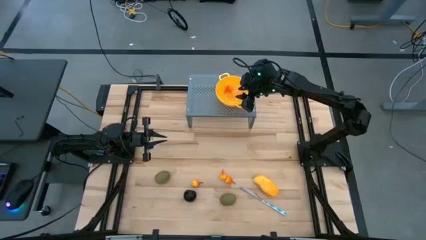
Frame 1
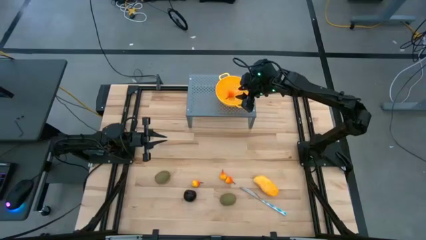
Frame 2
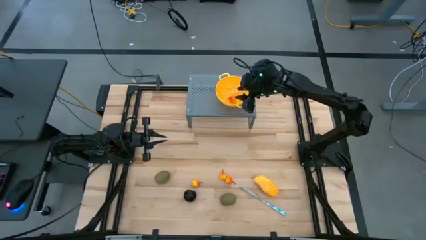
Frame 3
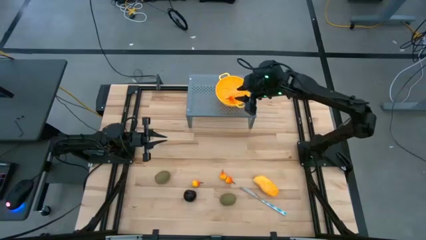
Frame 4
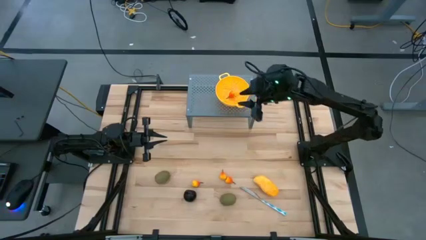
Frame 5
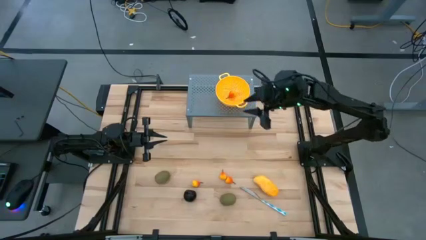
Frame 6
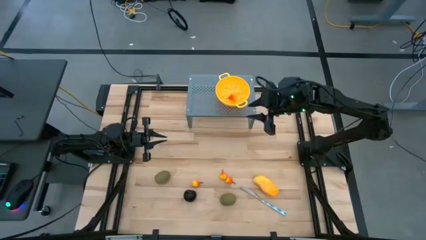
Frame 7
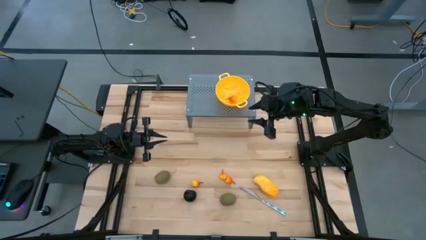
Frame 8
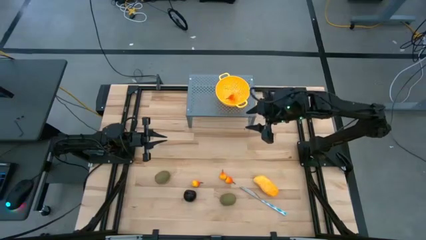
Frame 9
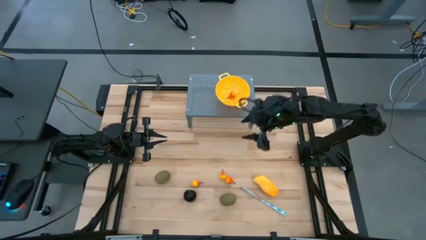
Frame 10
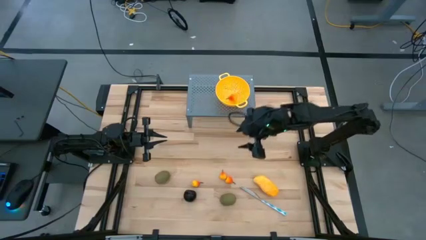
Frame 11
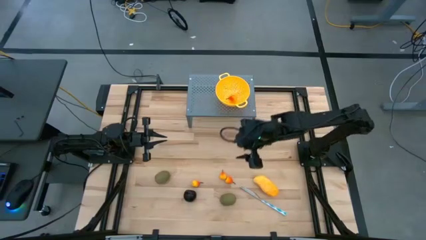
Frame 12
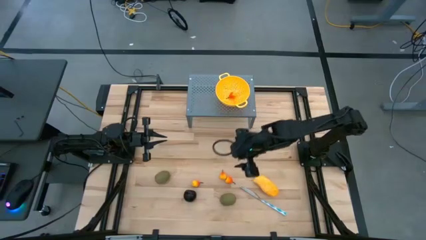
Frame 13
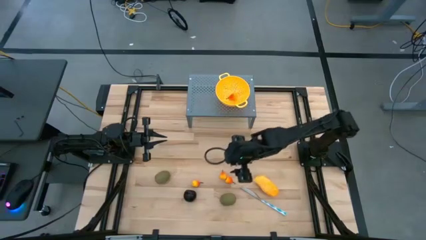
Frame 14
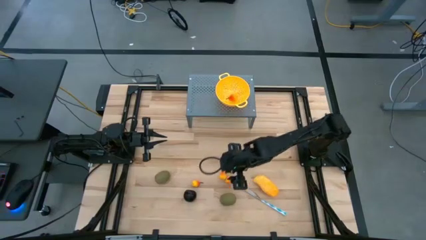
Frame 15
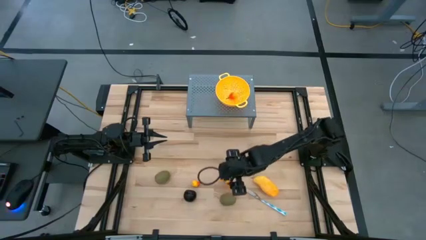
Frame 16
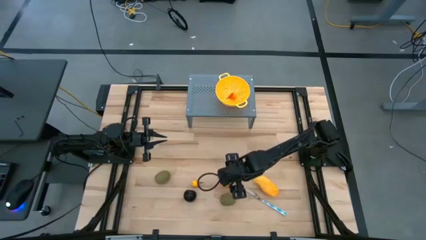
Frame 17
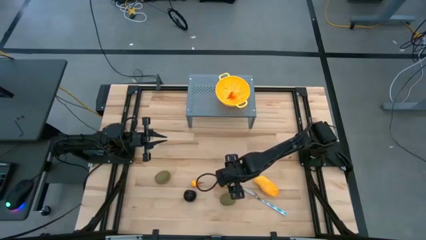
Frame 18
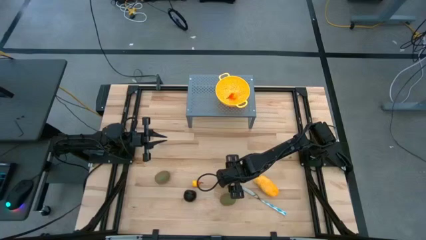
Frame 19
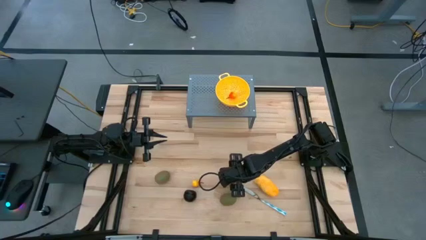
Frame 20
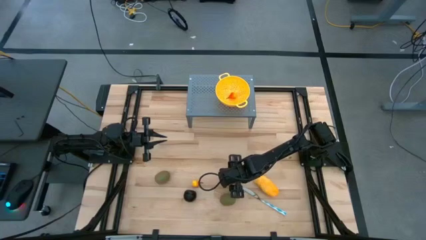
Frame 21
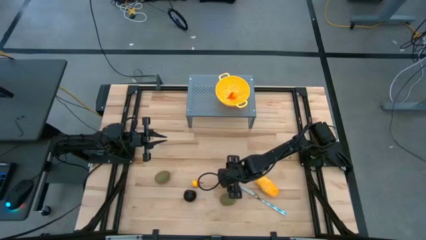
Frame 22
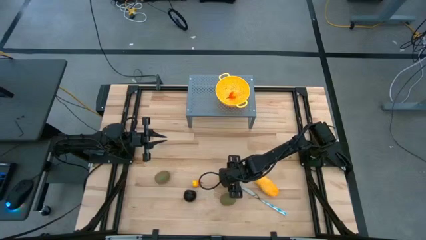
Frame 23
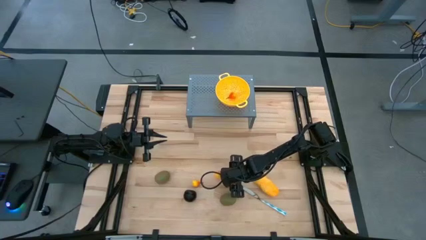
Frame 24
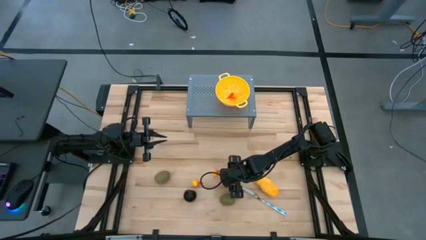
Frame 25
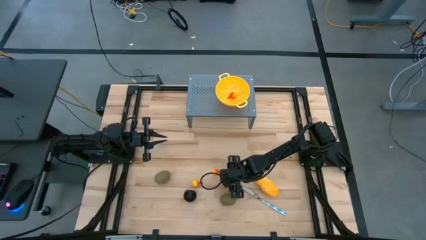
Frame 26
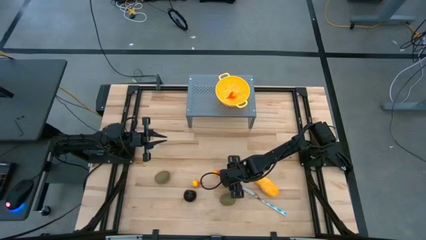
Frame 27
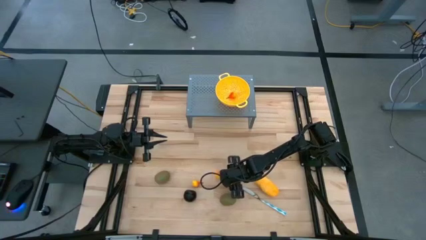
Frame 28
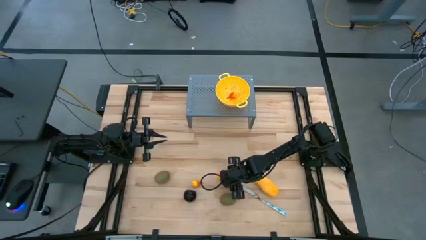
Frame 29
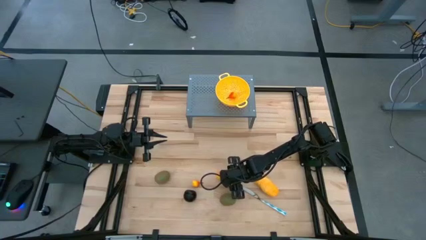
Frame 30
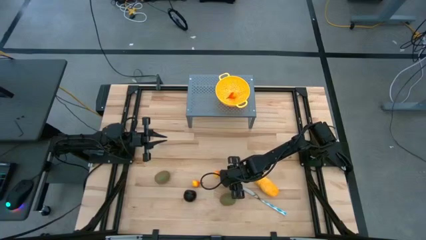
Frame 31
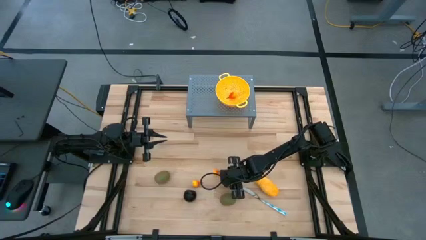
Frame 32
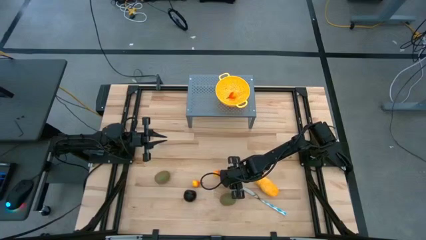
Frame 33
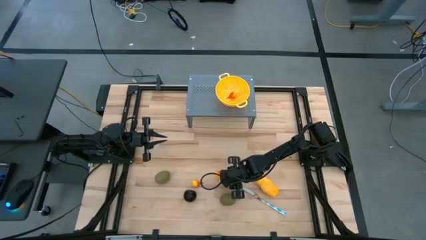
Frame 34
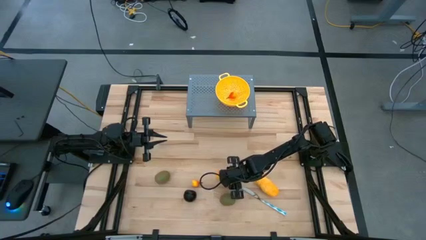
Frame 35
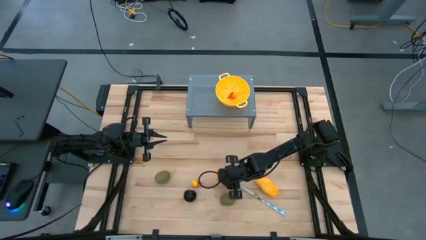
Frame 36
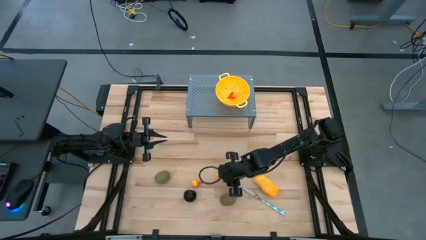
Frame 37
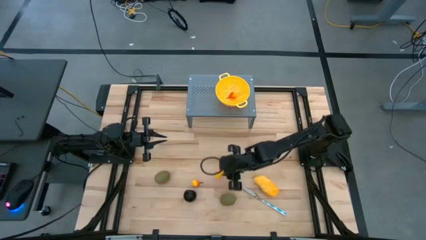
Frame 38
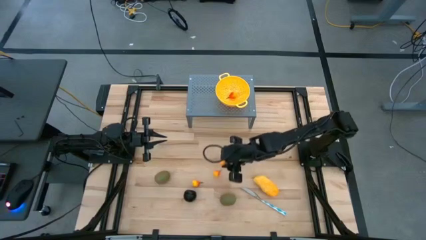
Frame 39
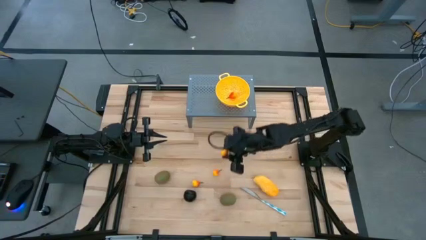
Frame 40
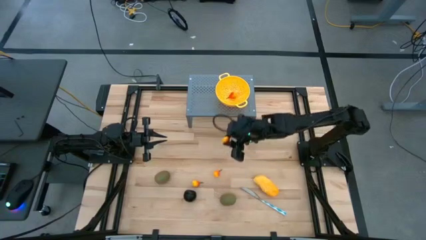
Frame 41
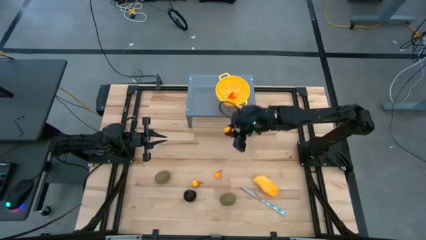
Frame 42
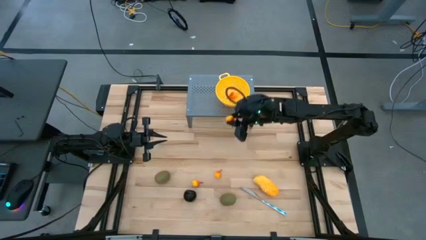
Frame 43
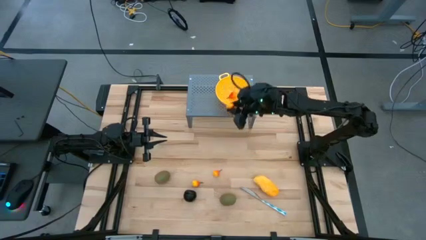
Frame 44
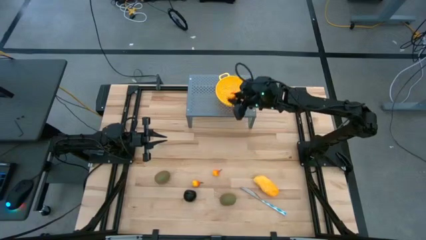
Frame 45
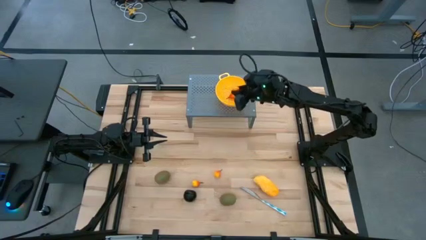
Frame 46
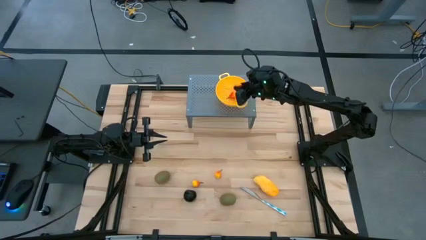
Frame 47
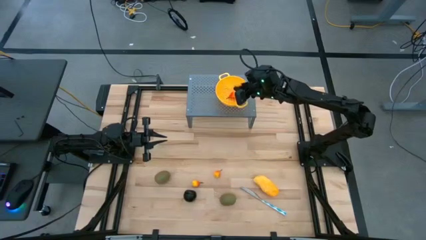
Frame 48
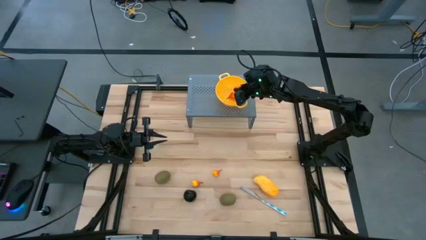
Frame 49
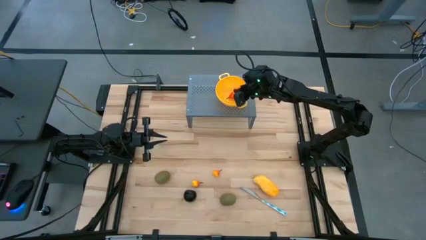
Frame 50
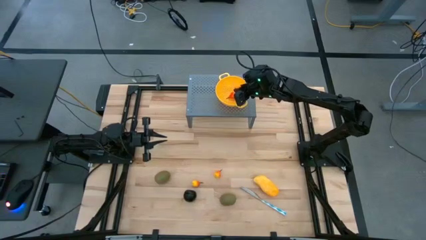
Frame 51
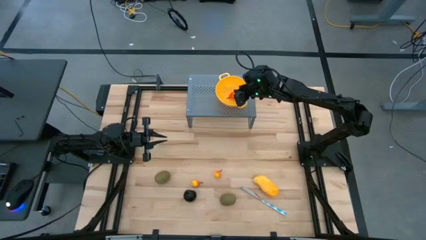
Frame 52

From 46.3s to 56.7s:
Task: Pick & Place Fruit
Put the peach into the yellow strainer bowl on the shelf
